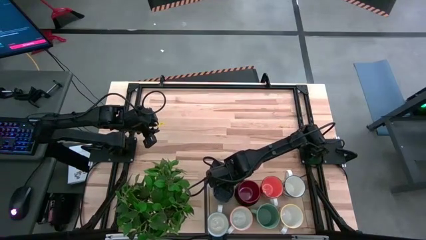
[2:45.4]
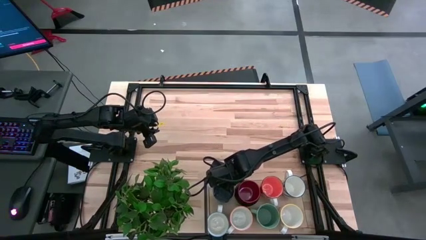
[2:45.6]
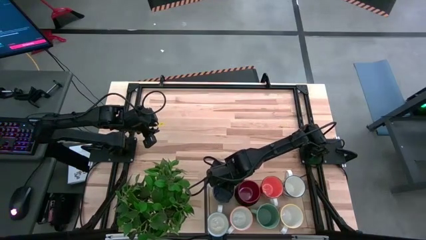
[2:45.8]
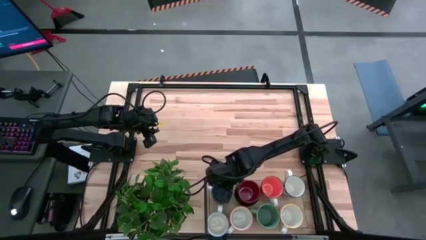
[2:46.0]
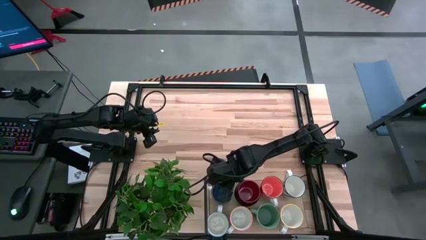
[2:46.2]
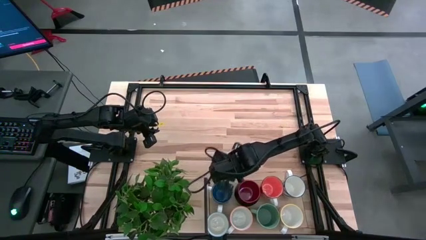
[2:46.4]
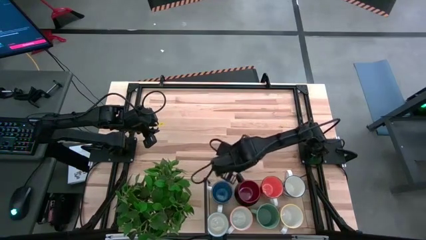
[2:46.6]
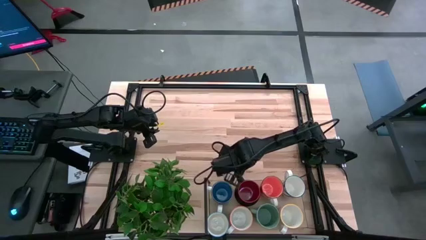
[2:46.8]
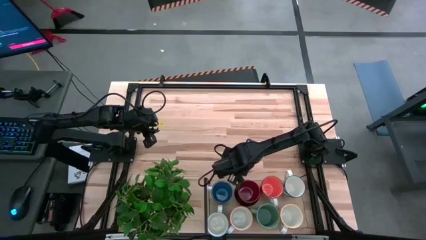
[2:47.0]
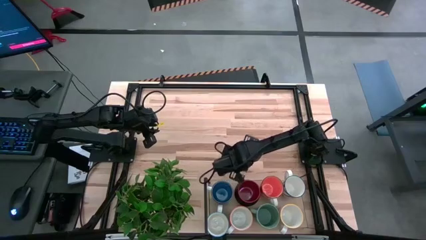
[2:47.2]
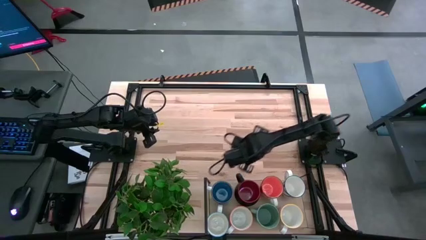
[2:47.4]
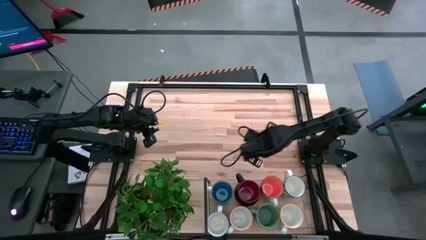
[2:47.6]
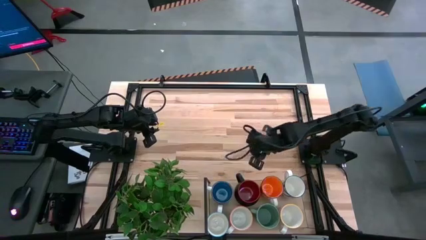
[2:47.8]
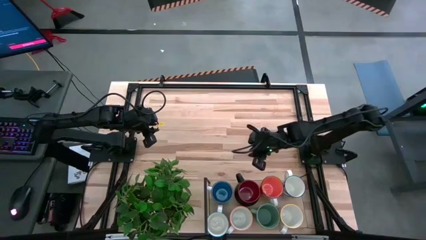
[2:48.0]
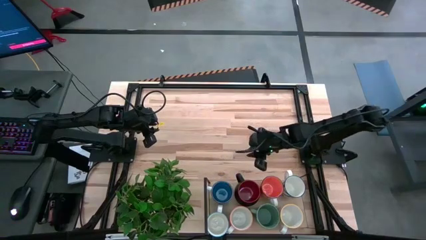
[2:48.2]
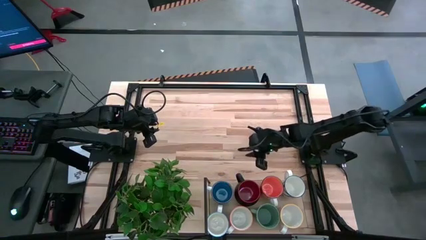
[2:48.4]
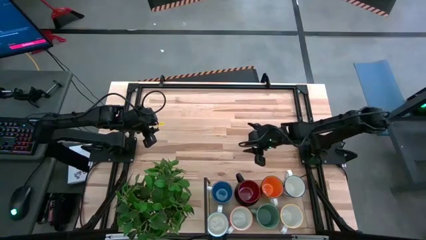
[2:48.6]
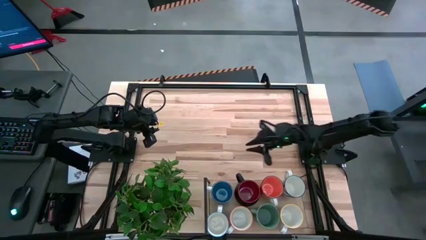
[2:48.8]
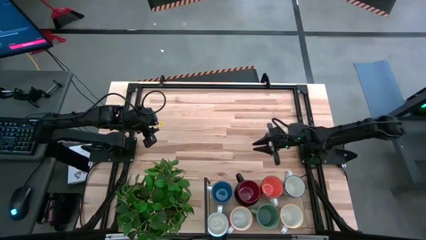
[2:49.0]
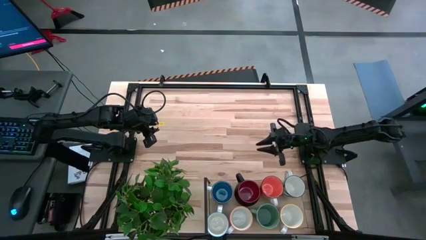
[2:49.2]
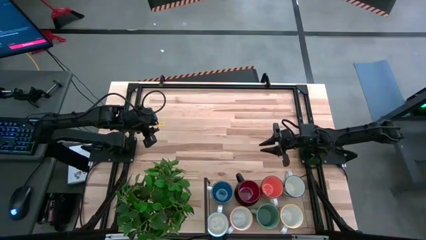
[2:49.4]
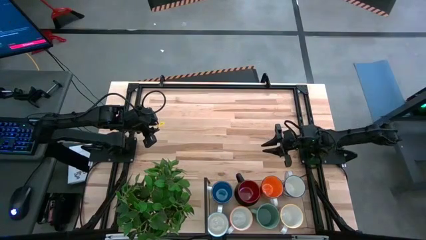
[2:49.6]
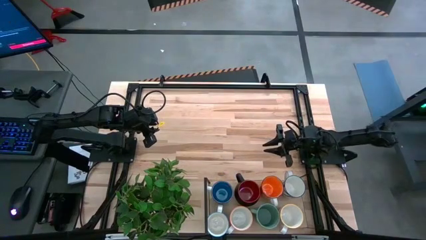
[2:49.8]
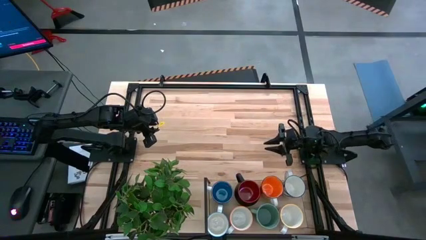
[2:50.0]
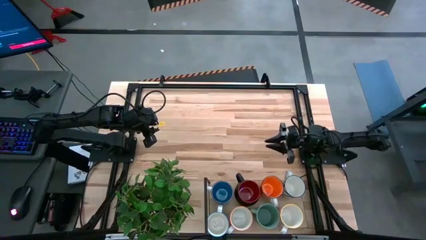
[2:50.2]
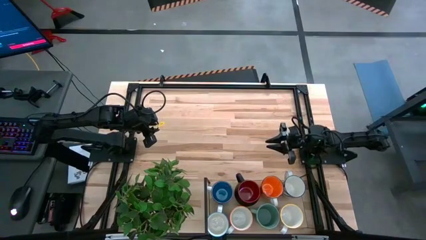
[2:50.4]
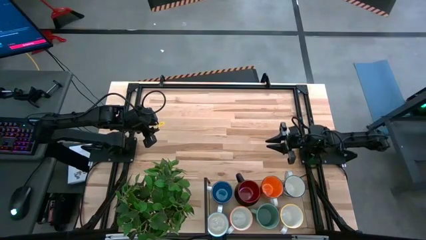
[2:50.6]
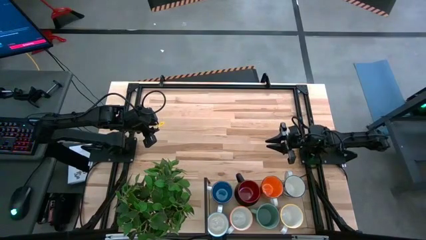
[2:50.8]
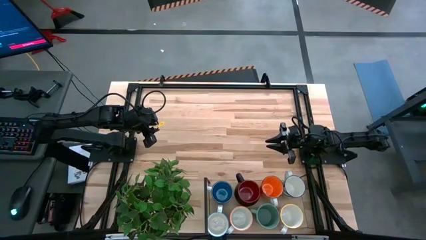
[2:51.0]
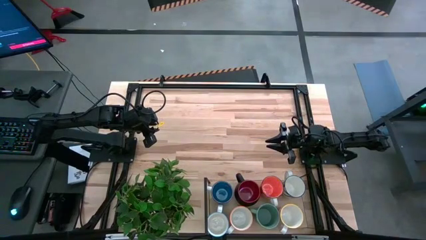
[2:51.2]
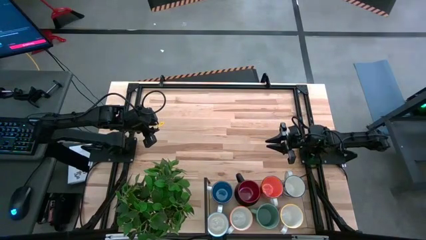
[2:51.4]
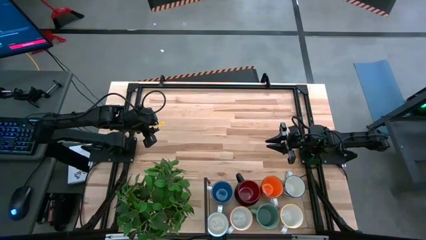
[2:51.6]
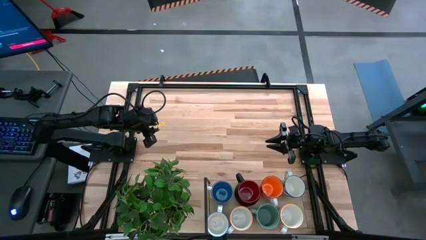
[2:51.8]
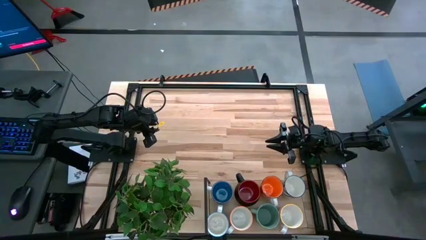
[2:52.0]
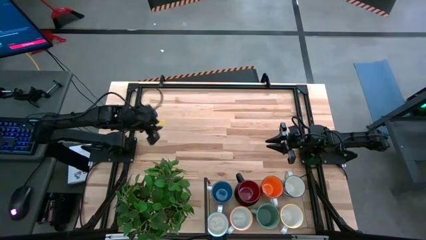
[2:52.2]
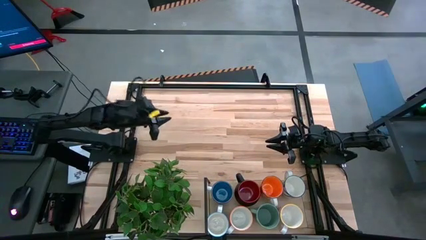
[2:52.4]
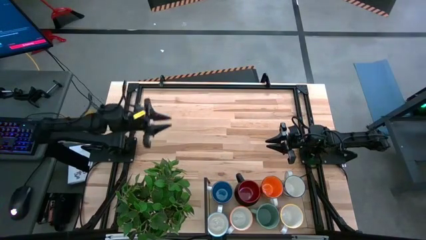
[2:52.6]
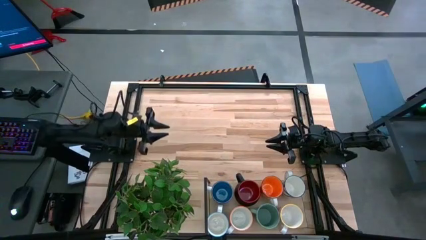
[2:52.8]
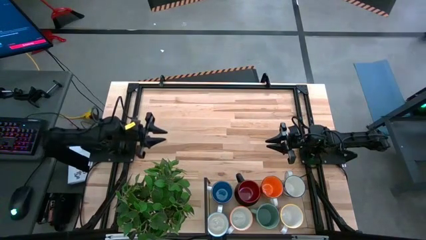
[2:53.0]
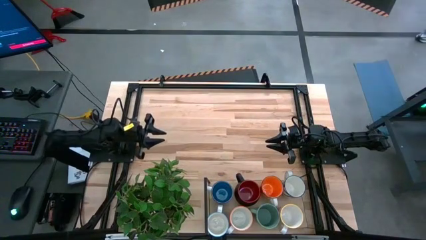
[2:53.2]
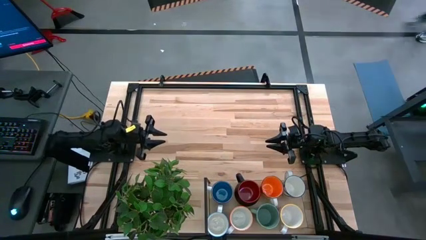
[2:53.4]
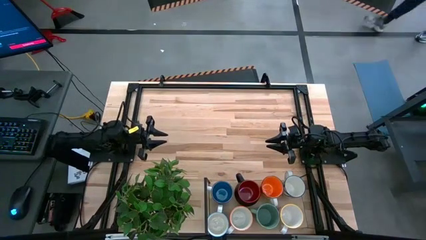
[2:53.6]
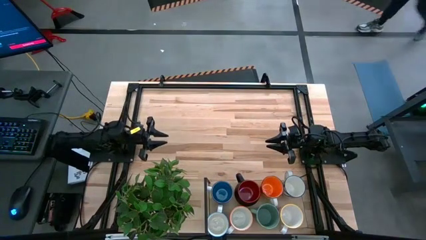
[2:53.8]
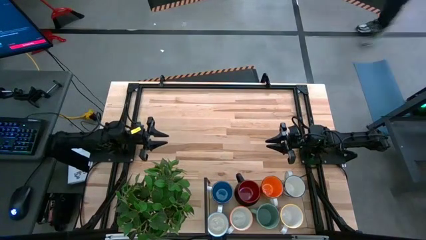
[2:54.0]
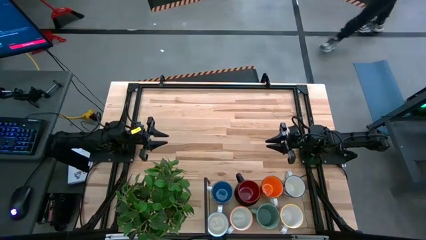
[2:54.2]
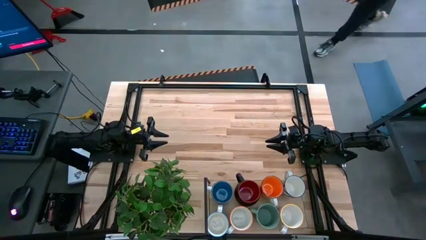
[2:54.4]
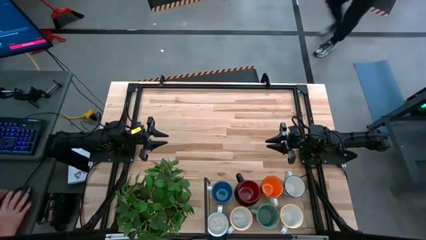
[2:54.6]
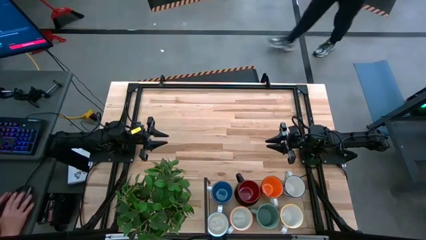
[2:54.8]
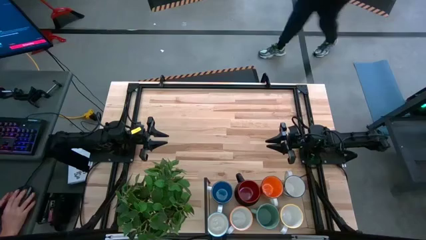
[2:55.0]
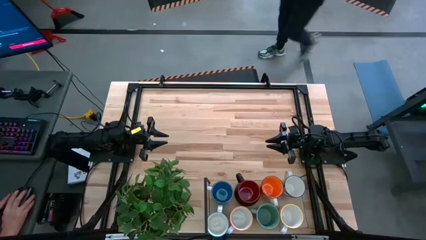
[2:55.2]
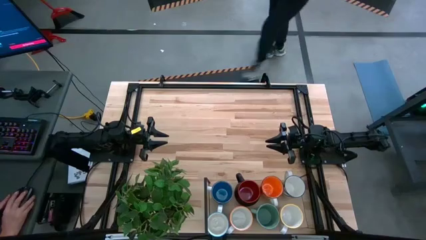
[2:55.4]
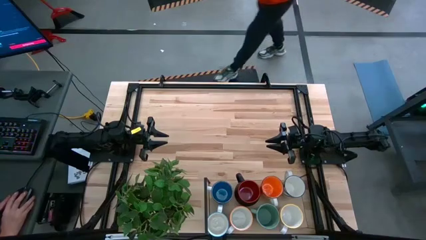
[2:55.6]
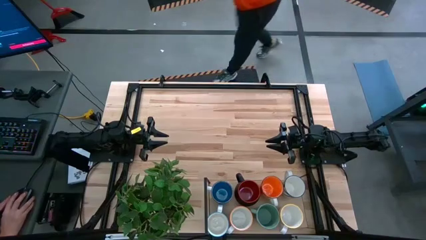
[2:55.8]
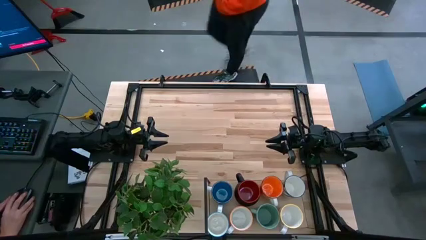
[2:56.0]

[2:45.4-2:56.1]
Task: Place coffee mugs
Return to home position

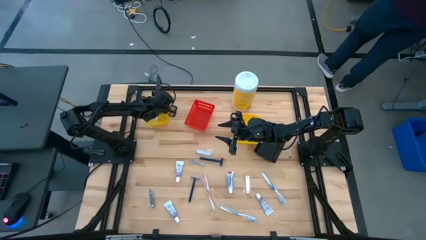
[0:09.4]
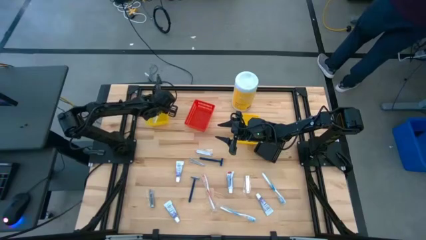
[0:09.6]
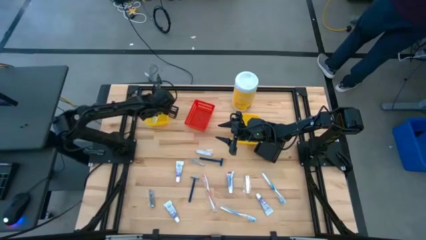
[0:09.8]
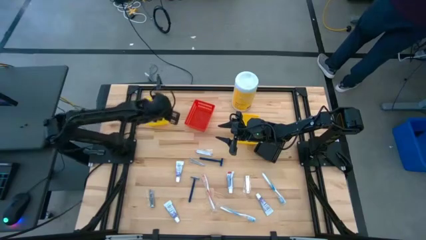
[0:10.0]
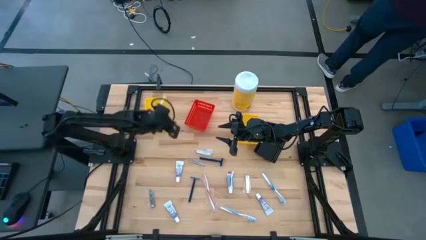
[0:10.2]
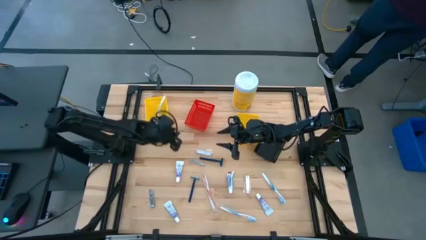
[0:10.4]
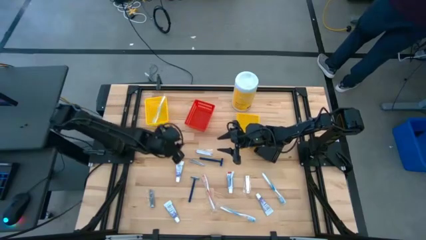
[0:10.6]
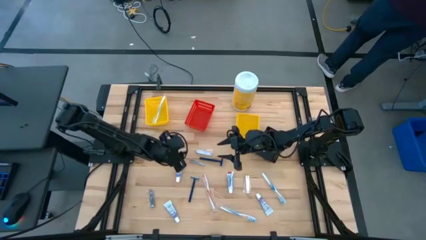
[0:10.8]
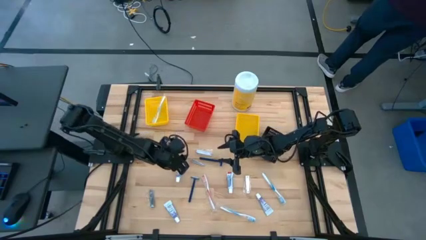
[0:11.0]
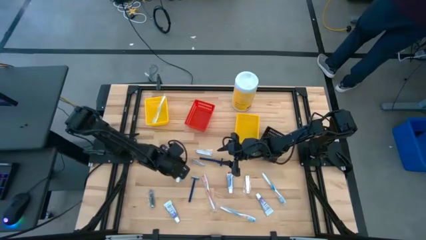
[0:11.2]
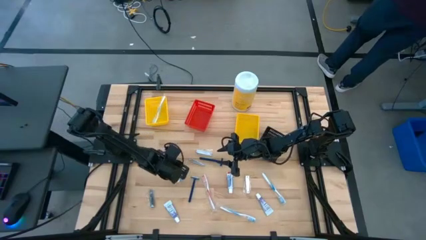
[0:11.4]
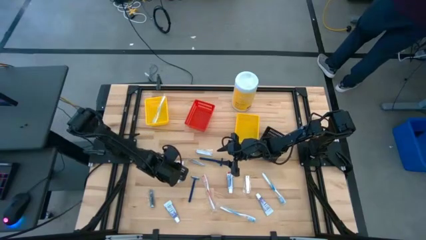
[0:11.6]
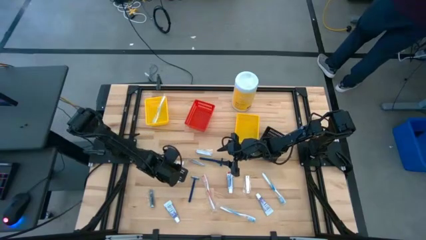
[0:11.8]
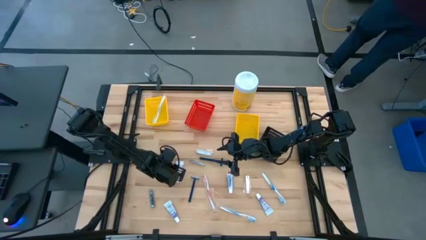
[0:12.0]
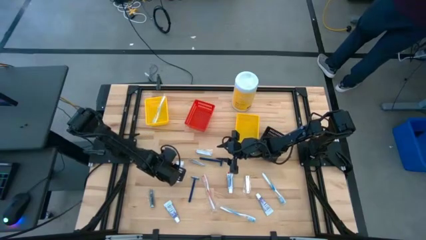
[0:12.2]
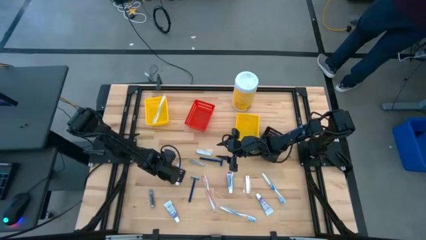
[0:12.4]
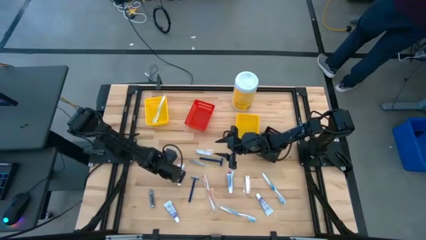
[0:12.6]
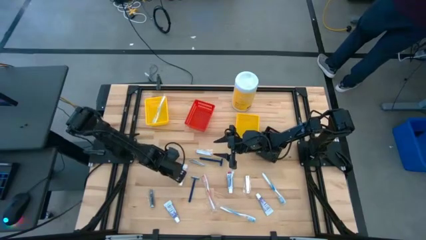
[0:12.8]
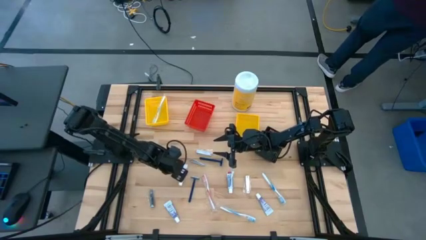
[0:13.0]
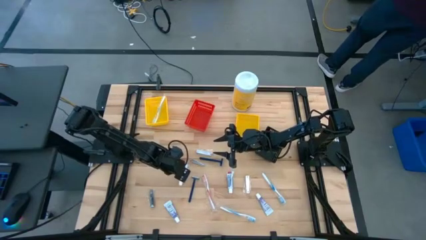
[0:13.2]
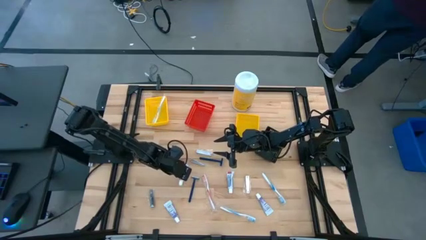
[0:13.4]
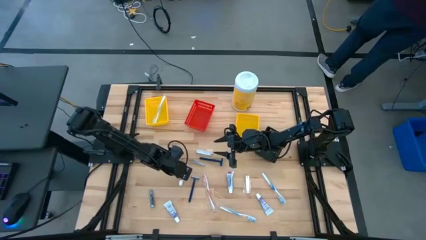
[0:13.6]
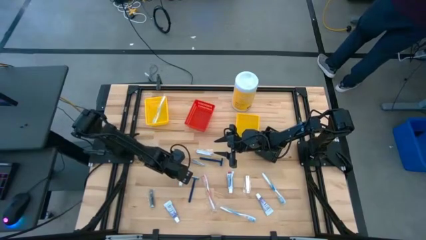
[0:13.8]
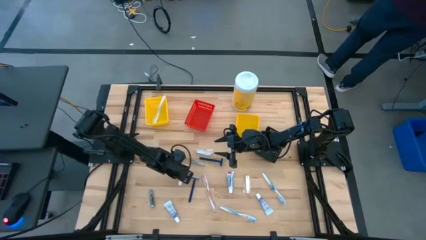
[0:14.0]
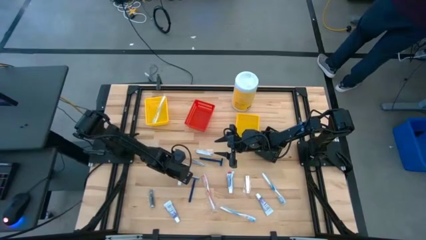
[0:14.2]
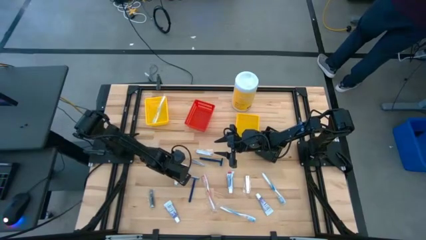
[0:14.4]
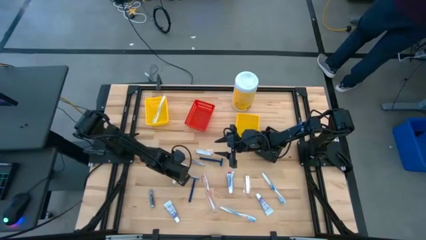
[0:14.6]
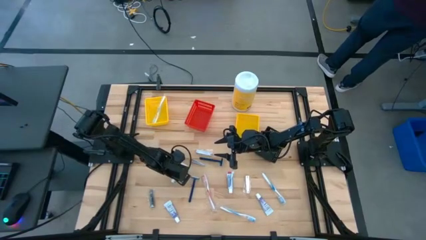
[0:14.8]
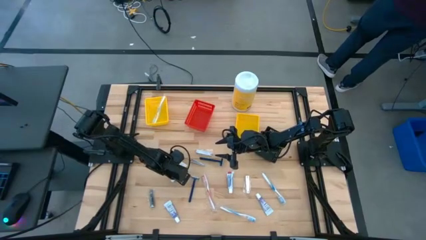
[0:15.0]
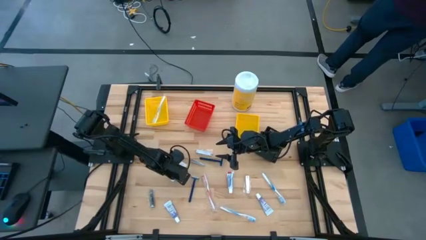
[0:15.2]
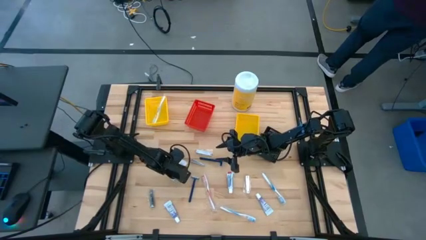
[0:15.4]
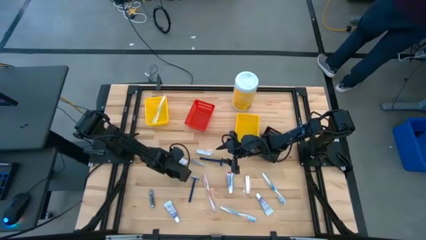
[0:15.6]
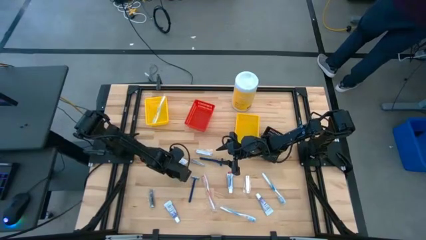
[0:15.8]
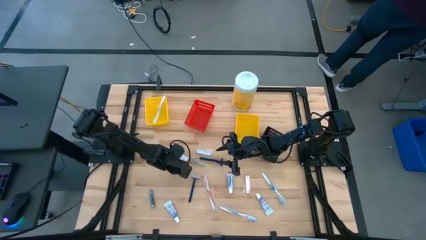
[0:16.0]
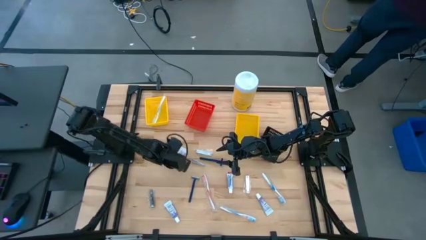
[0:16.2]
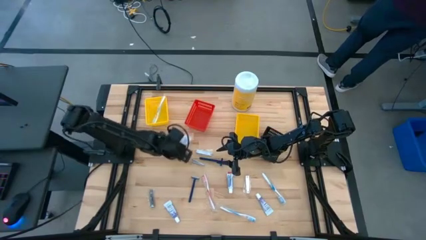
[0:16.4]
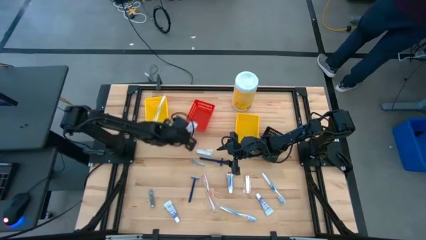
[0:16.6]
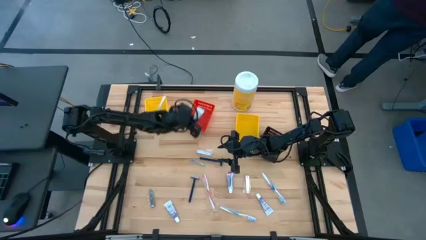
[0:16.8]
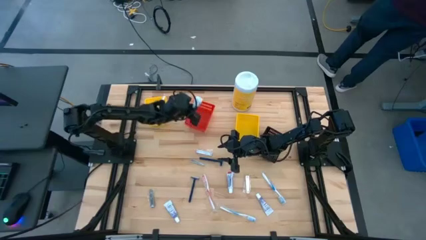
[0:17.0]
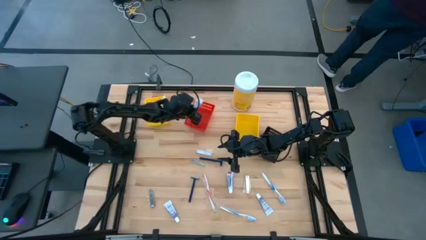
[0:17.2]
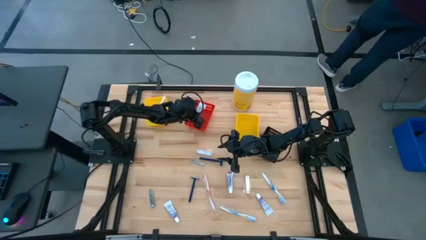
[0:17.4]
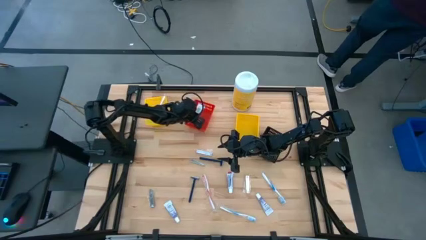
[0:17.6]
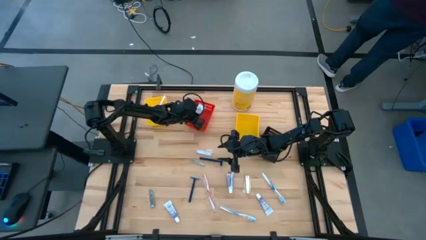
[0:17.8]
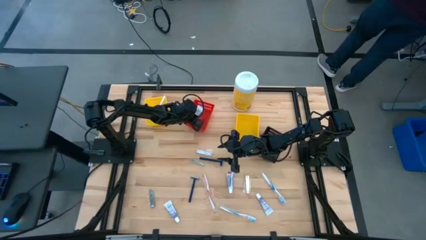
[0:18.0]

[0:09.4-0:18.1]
Task: Pick & Place Travel size toiletries
Put the white toothpaste into the red basket
